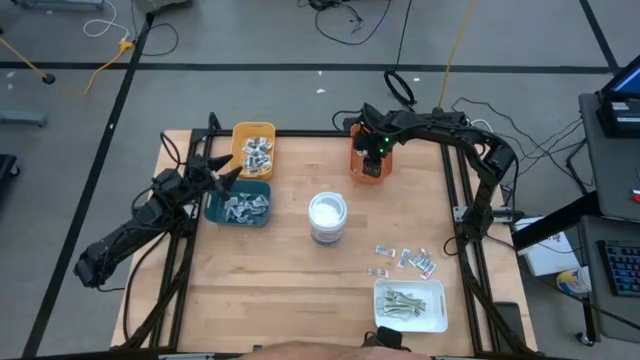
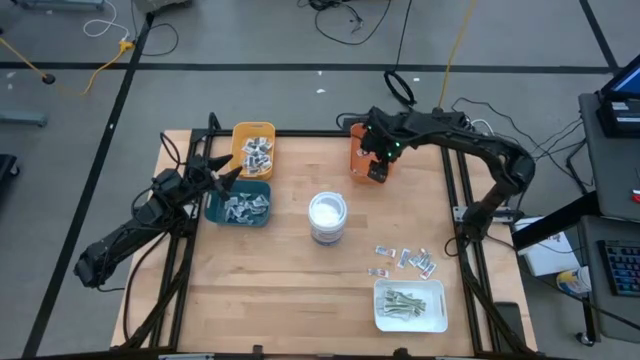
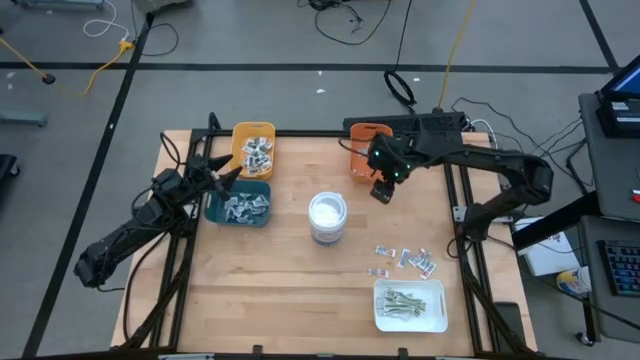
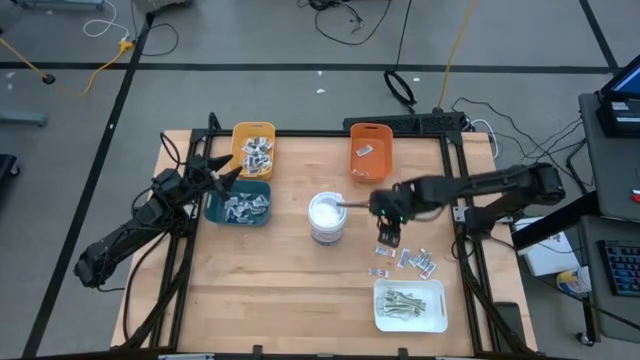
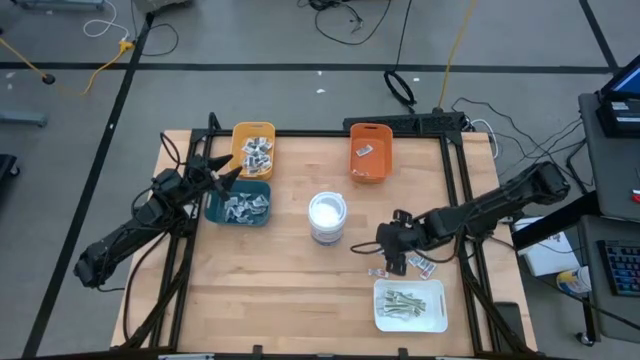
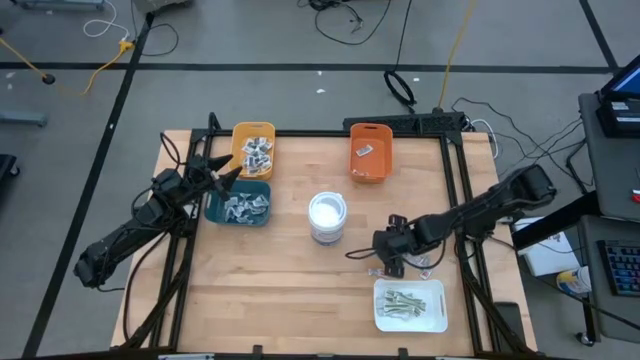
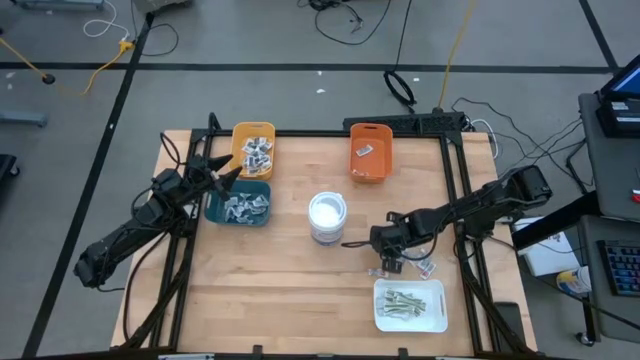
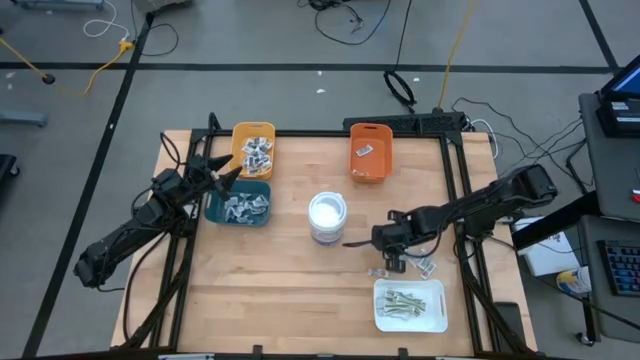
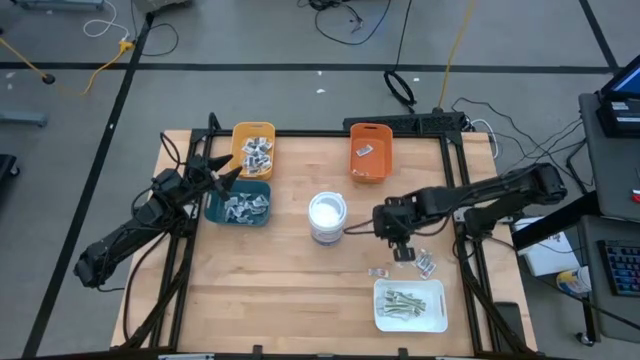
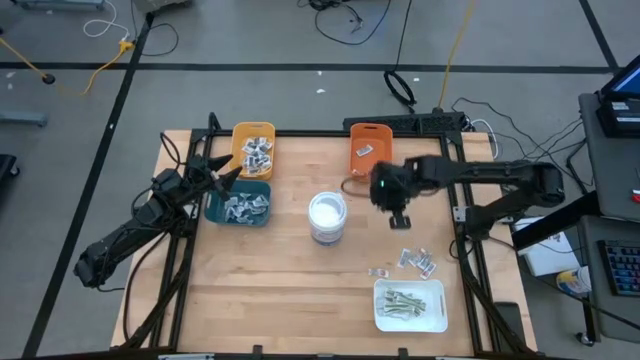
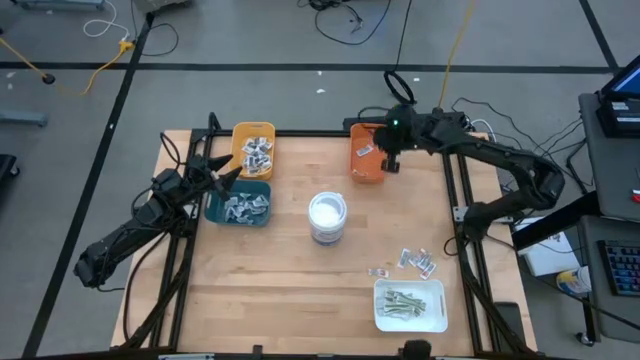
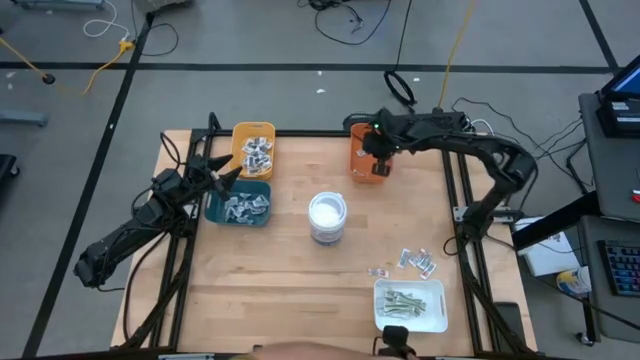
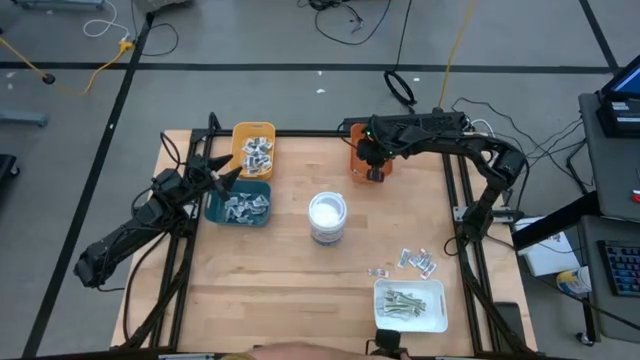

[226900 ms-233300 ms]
Task: Pick & Place First Aid Supplies
Put the orange pad into the orange bin

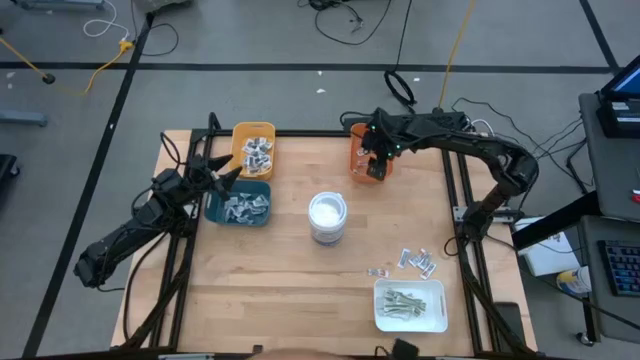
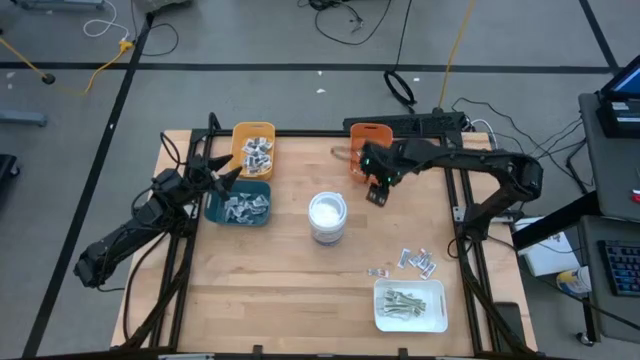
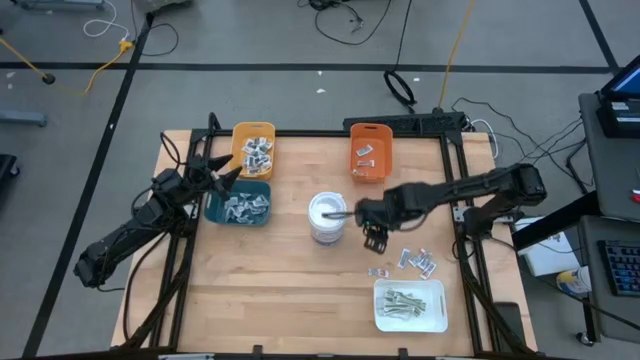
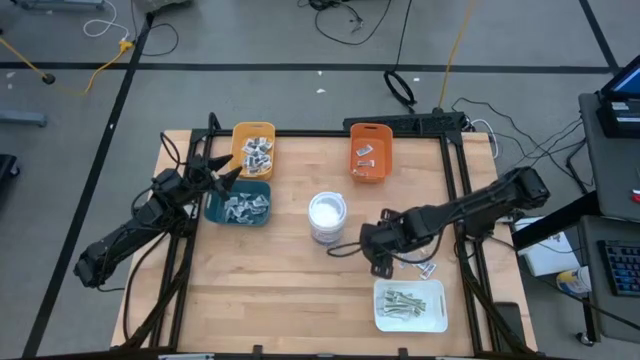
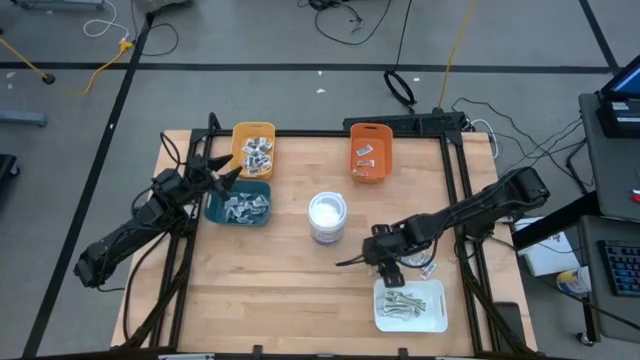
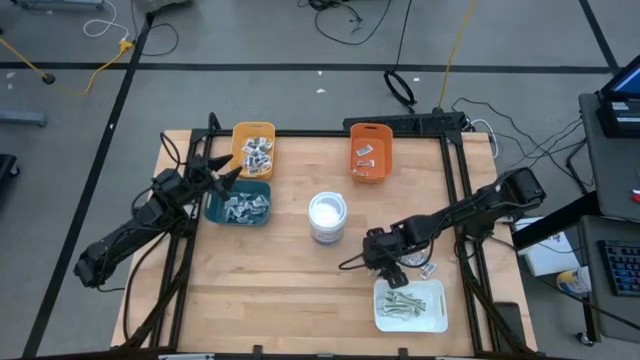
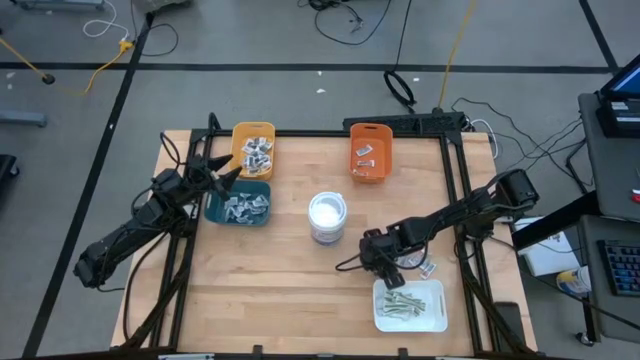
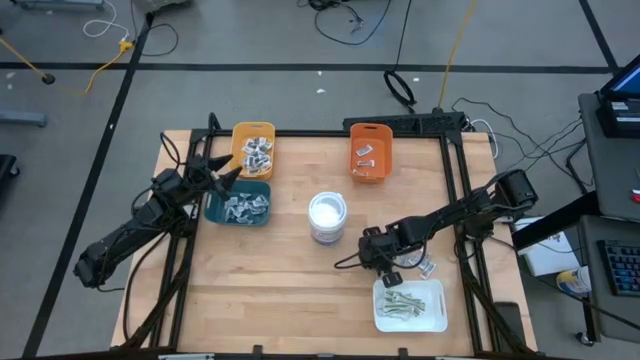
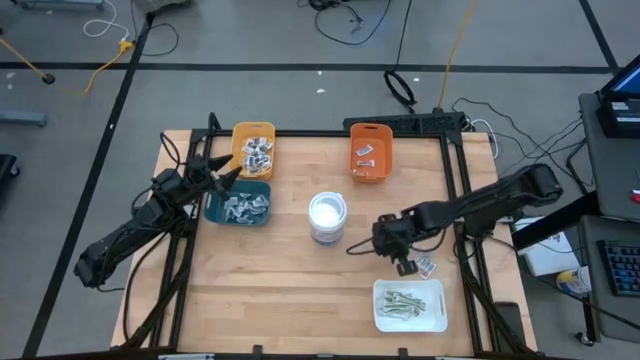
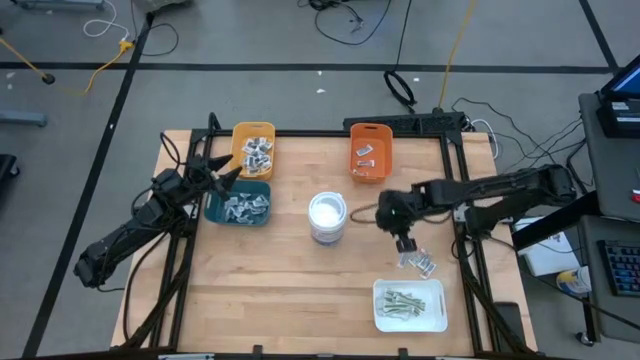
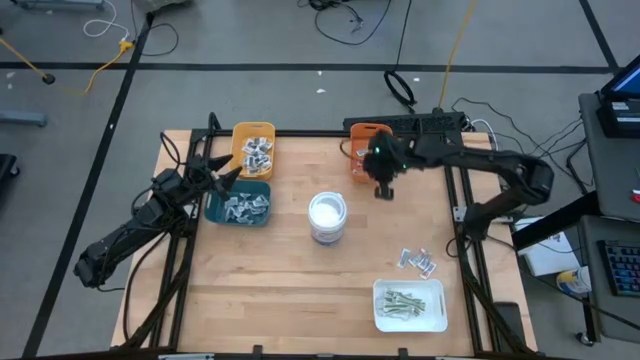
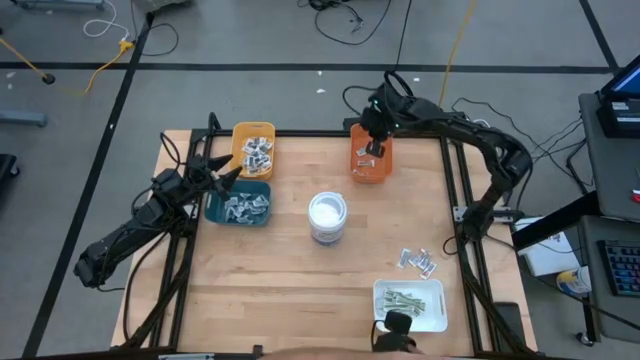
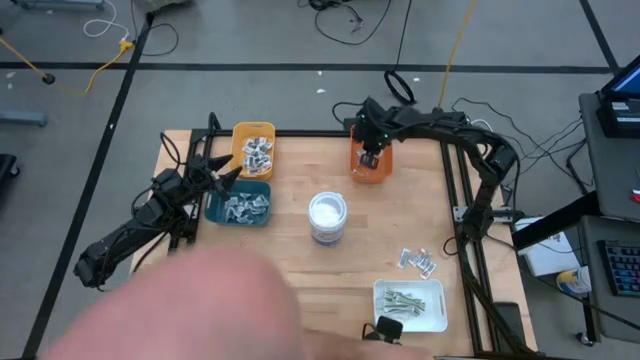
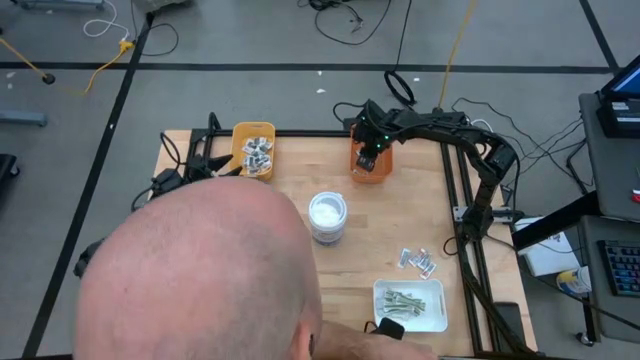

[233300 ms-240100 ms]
Put the orange pad into the orange bin

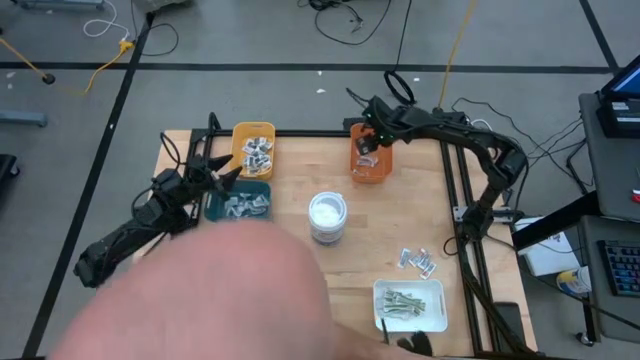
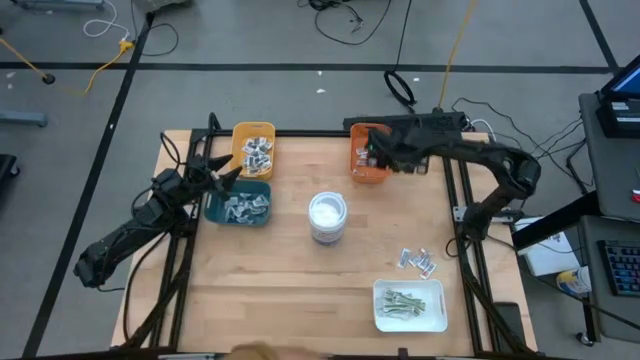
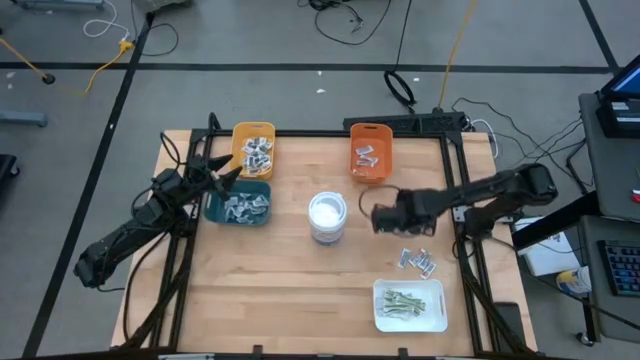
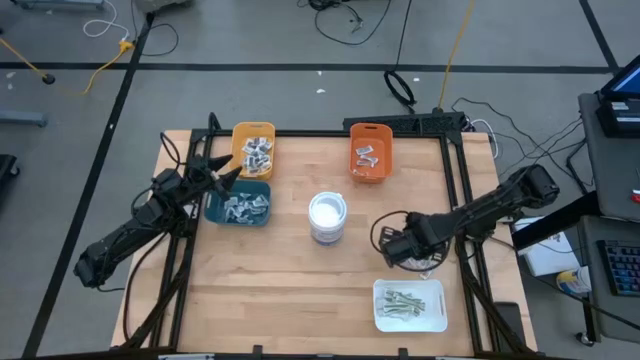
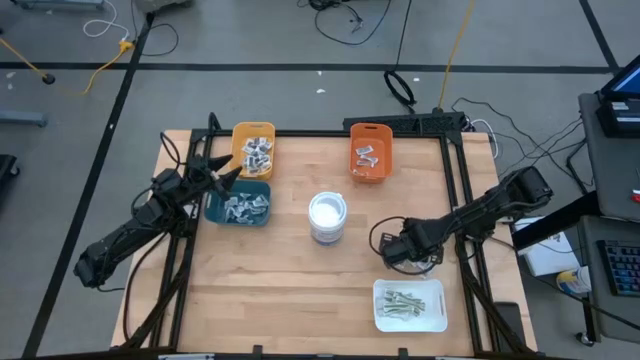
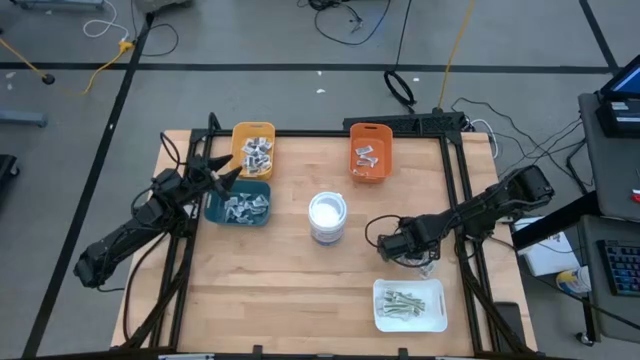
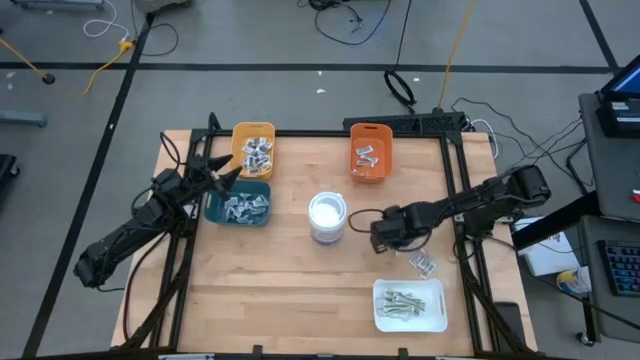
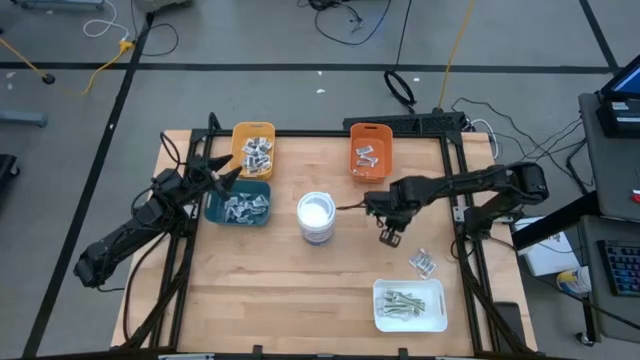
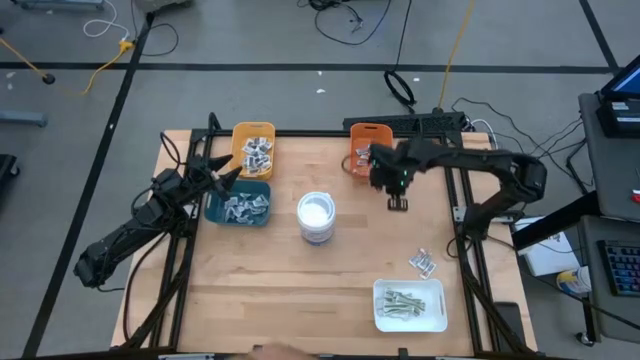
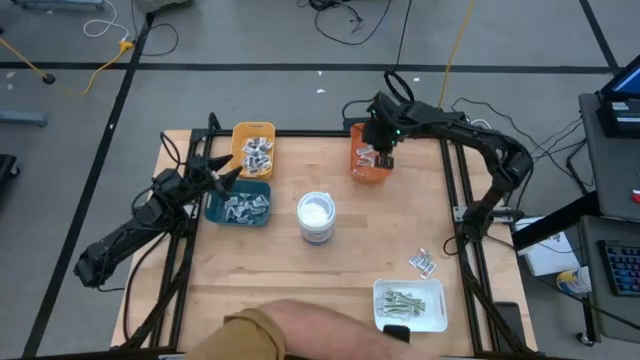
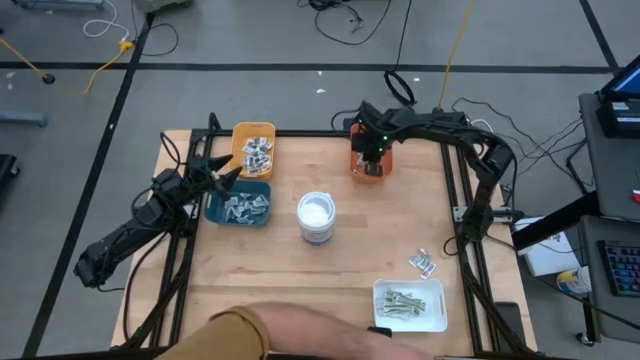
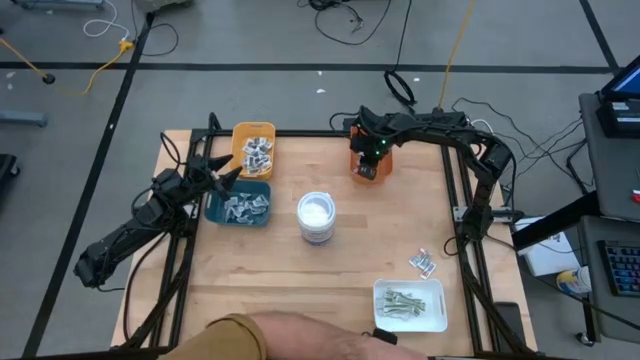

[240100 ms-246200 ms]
Put the orange pad into the orange bin
